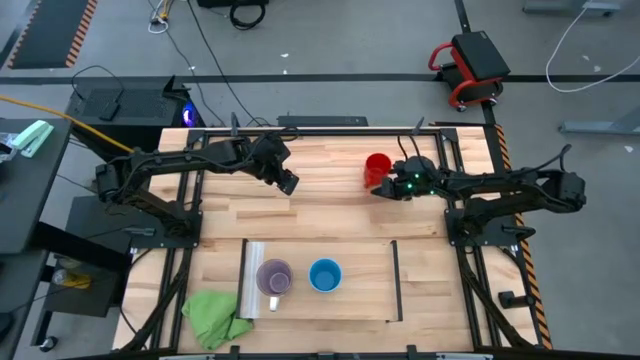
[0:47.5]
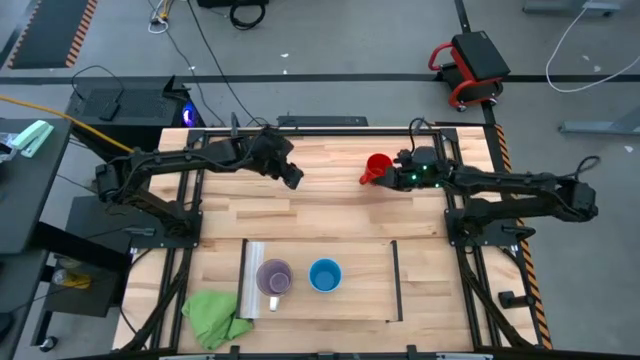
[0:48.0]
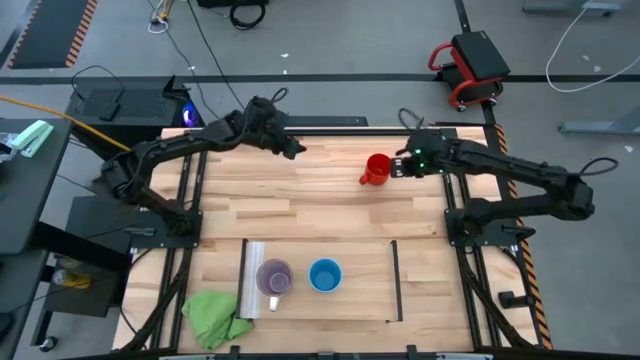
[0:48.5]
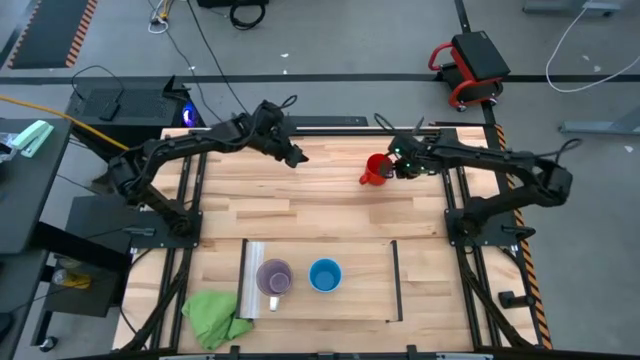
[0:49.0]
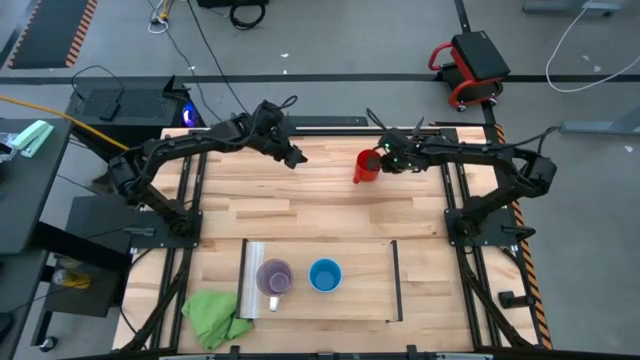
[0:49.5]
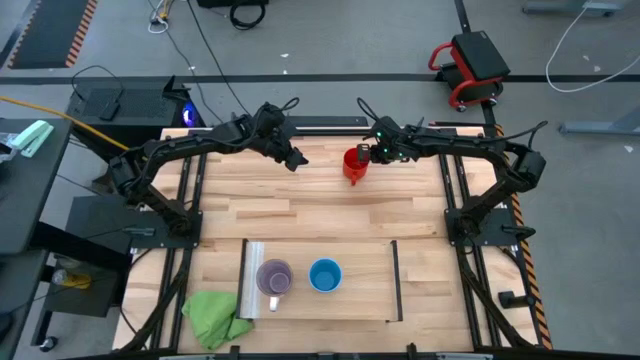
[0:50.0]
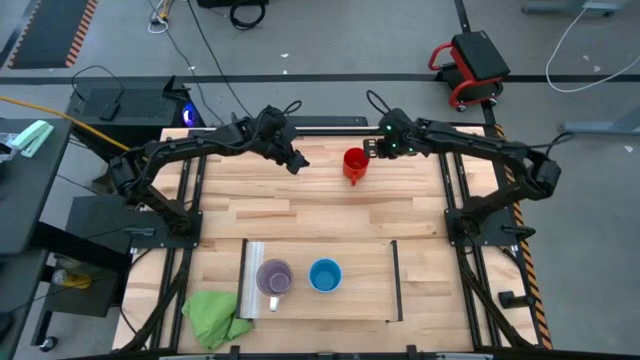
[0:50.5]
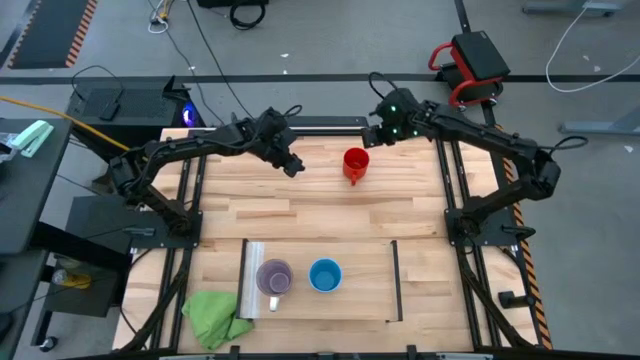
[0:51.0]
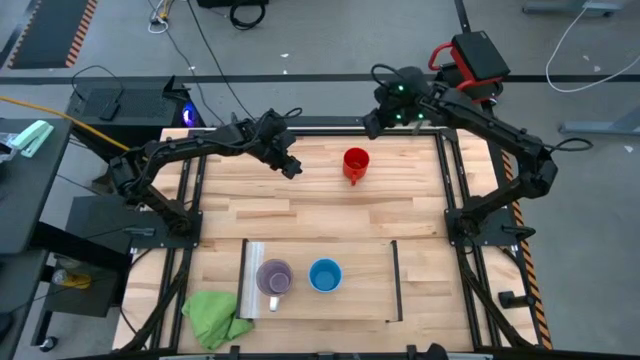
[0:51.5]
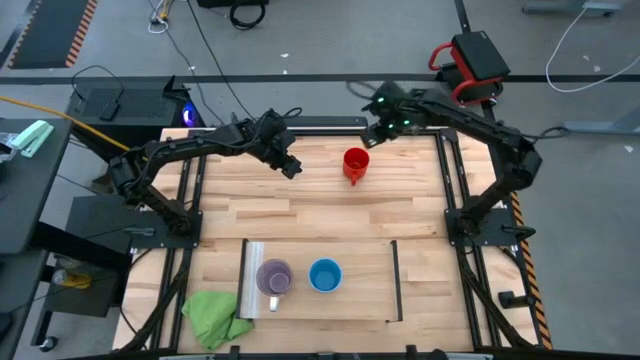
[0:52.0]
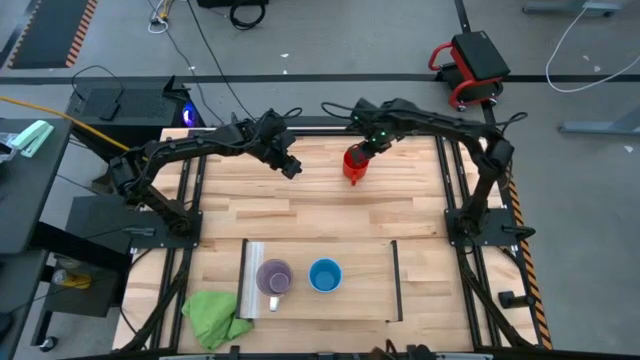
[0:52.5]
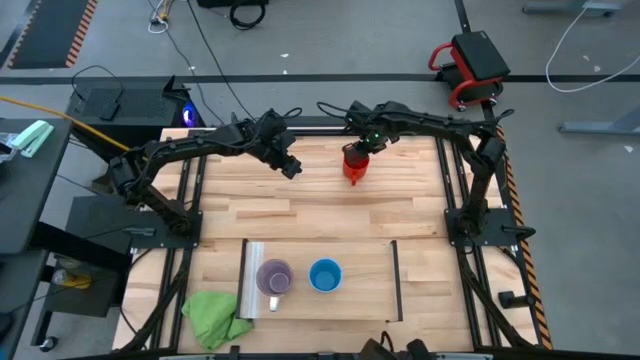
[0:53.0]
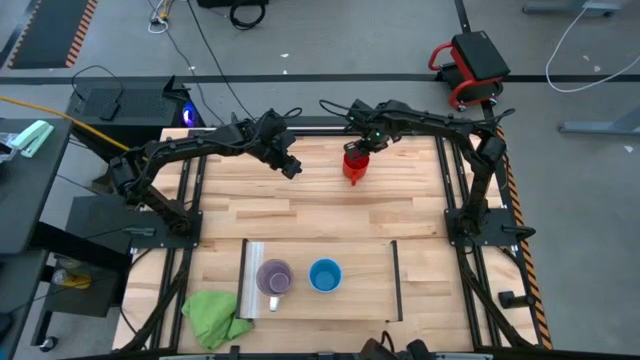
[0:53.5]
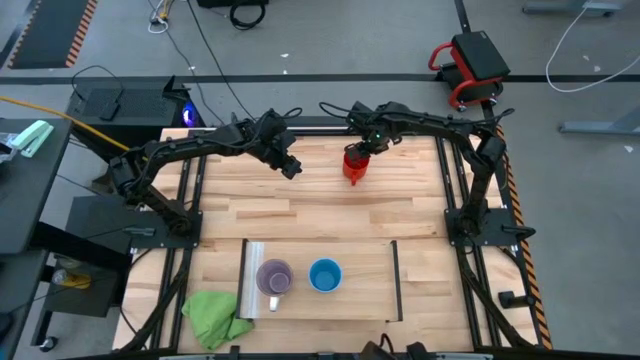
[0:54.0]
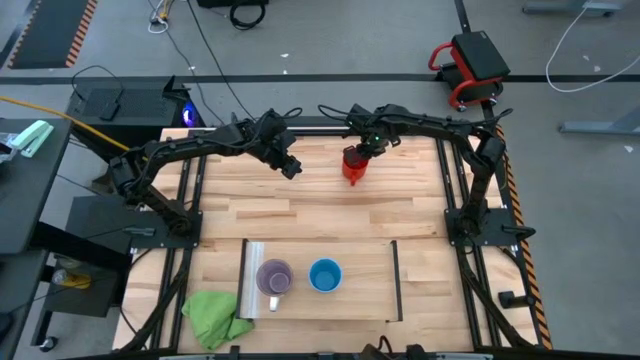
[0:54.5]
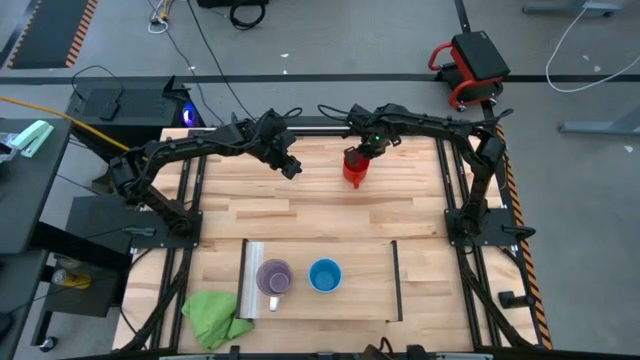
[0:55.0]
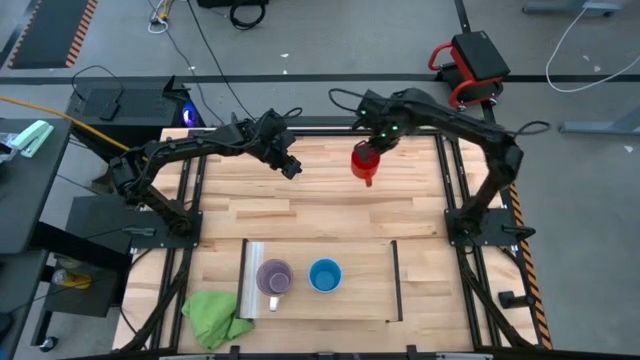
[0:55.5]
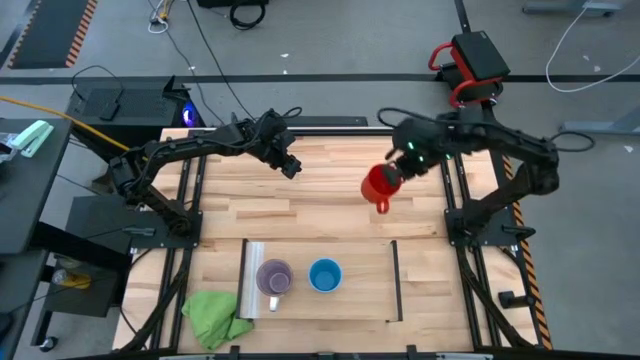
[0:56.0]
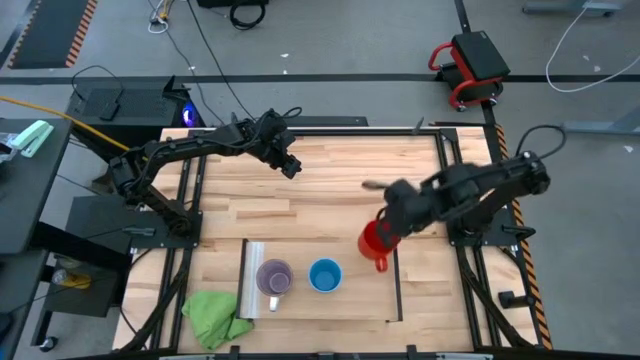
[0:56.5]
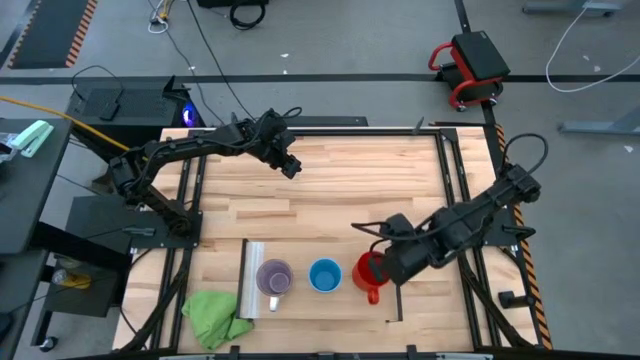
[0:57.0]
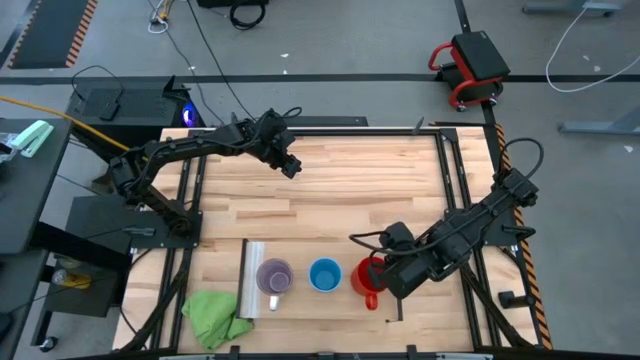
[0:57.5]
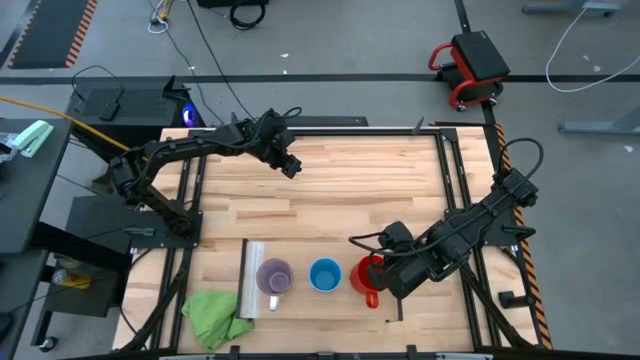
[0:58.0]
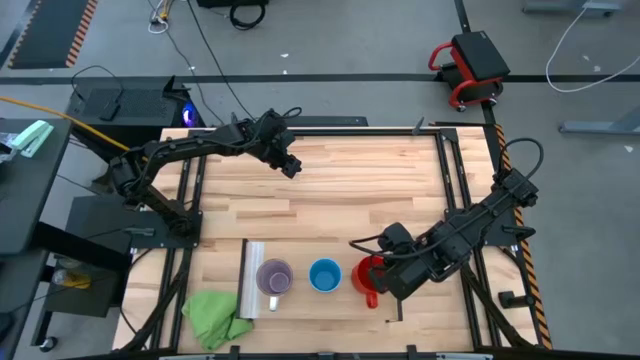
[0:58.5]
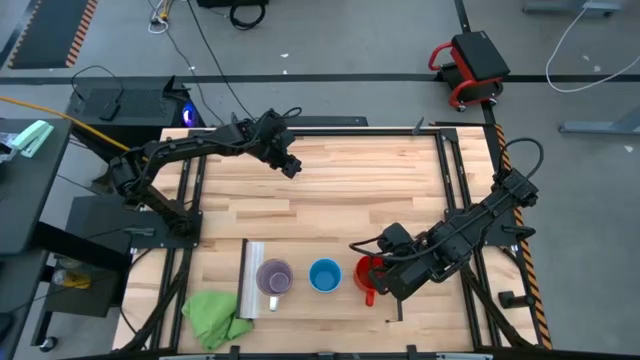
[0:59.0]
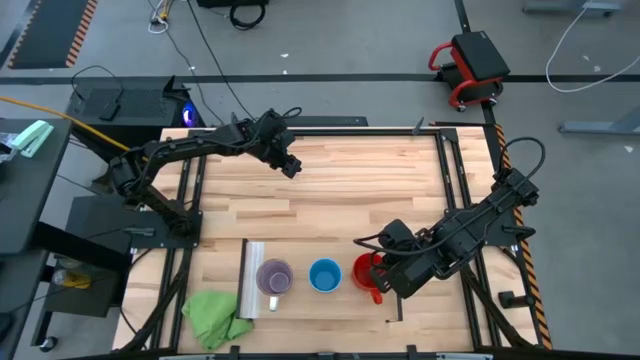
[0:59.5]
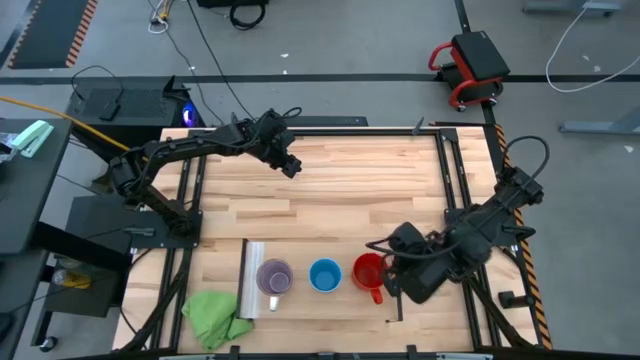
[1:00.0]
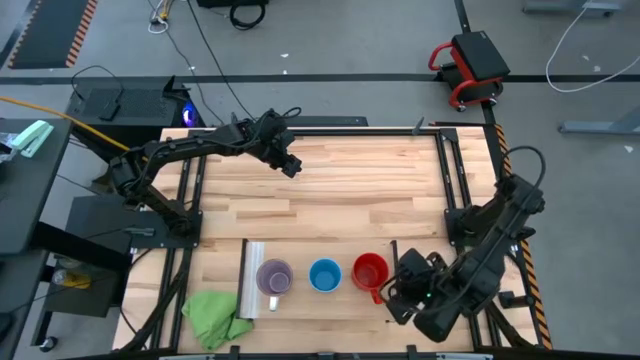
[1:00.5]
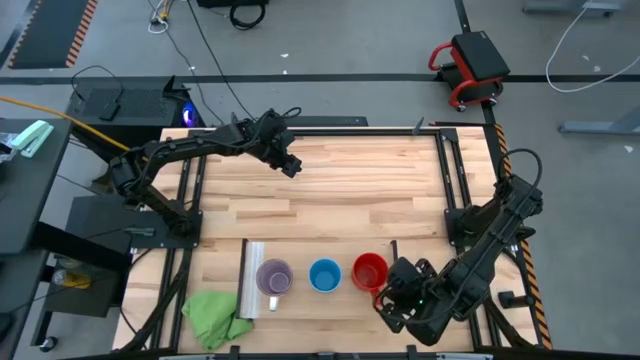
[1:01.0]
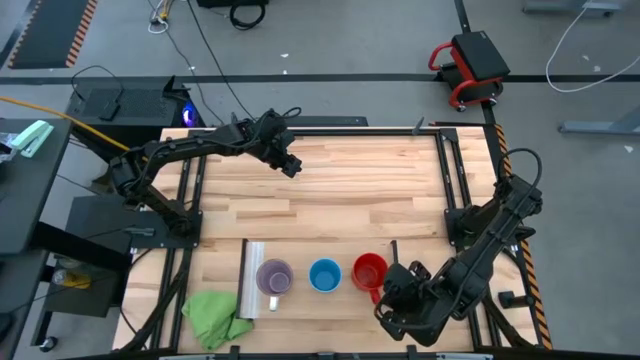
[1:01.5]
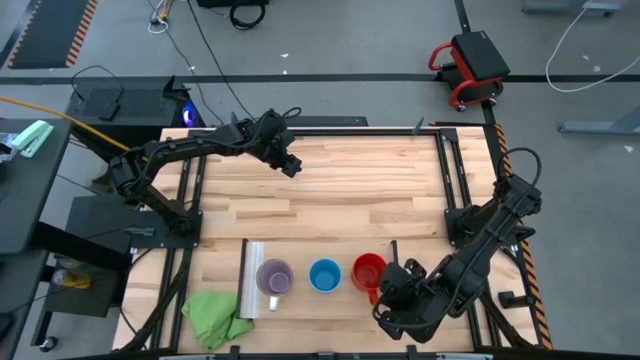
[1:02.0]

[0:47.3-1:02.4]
Task: Stack small to large cups/mugs on shelf
Put the red mug on the shelf

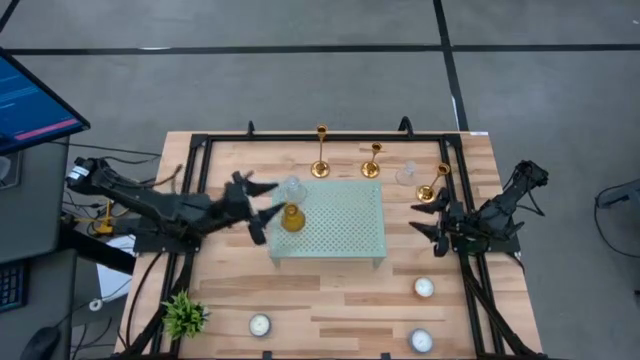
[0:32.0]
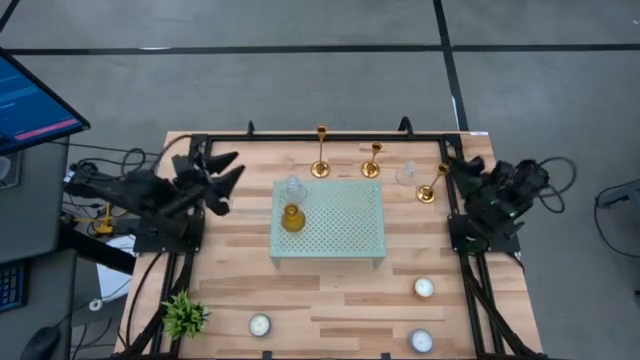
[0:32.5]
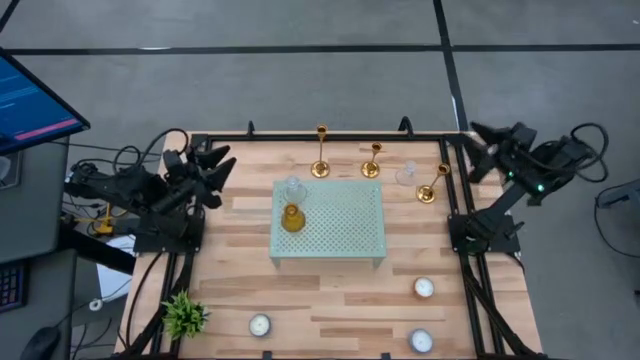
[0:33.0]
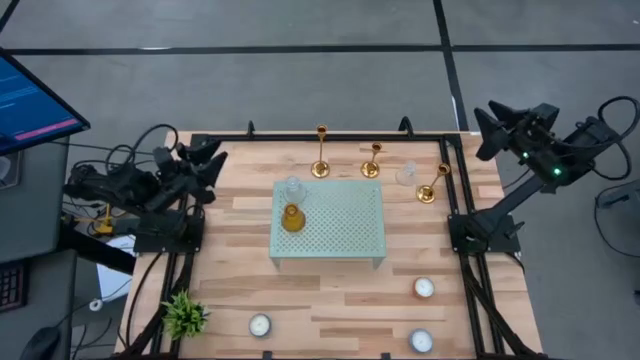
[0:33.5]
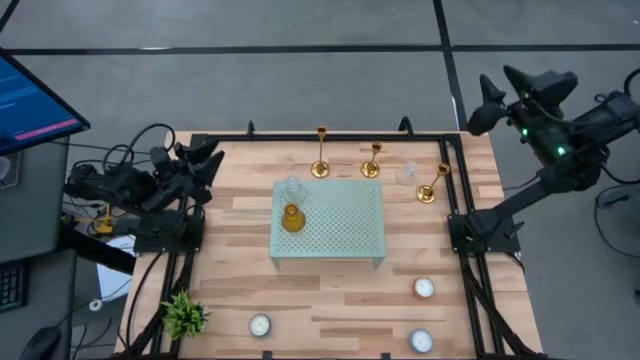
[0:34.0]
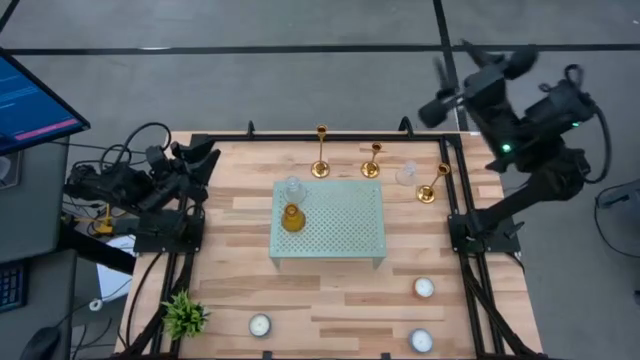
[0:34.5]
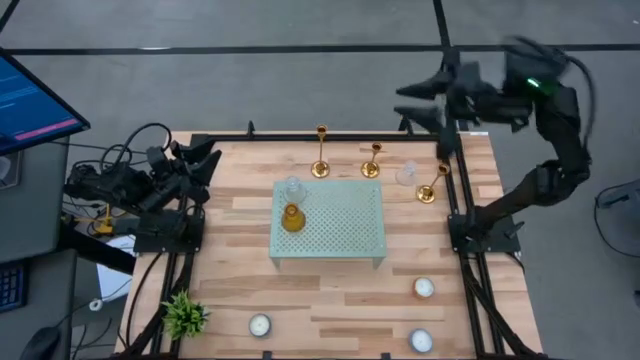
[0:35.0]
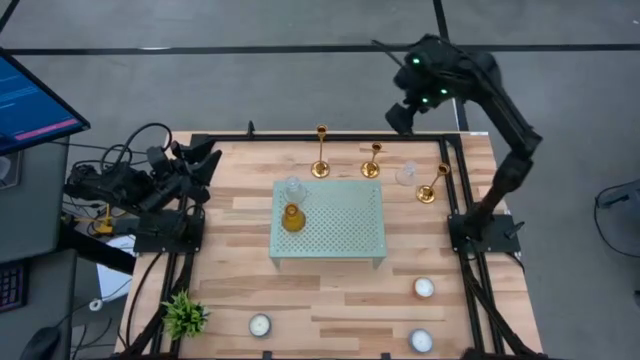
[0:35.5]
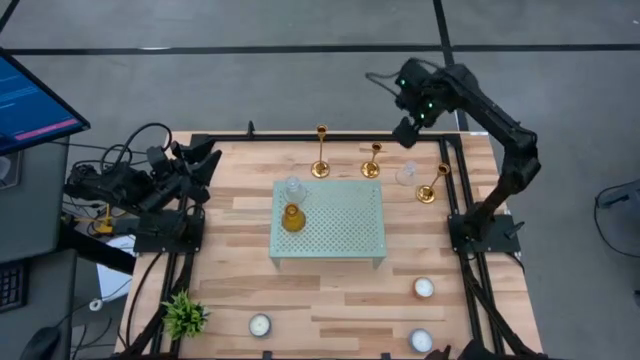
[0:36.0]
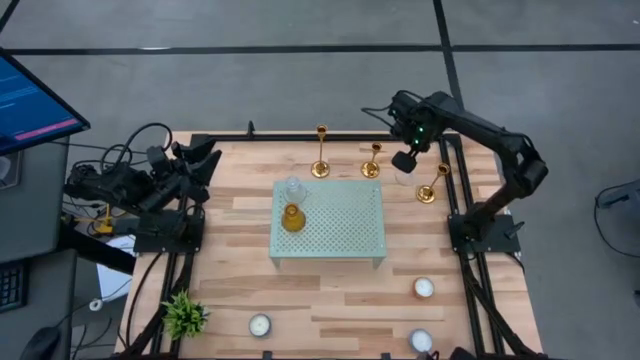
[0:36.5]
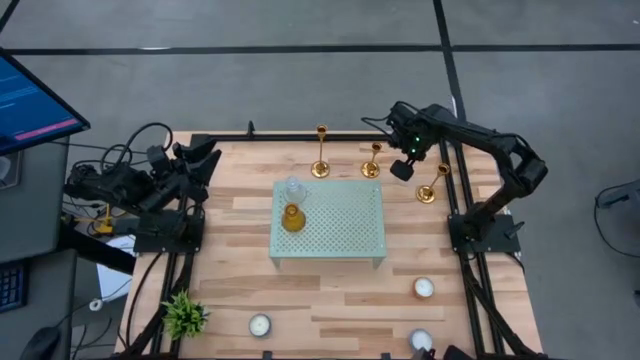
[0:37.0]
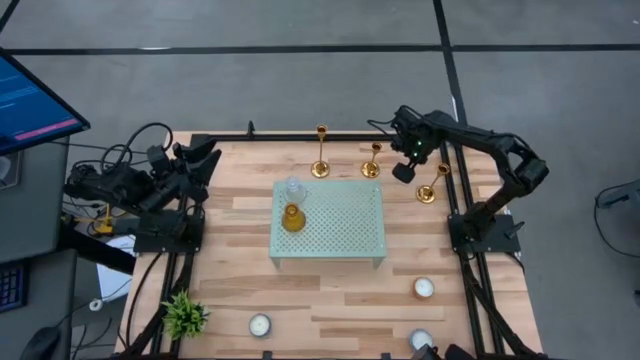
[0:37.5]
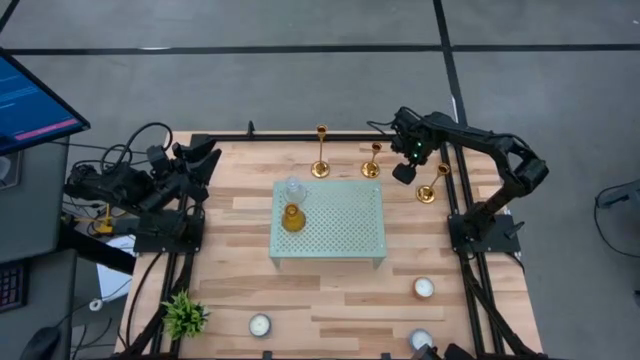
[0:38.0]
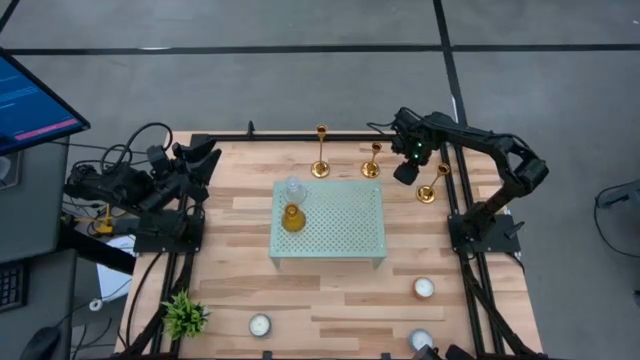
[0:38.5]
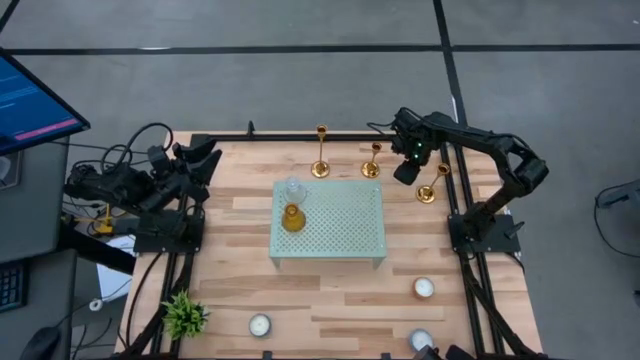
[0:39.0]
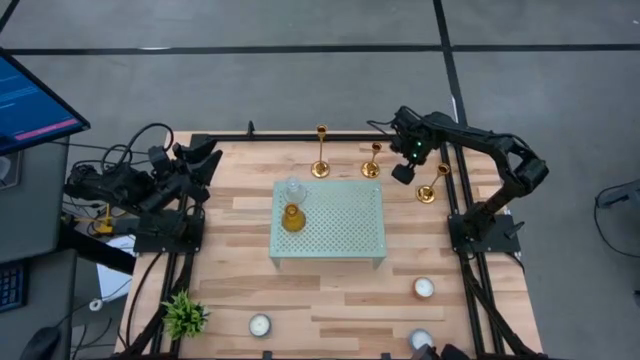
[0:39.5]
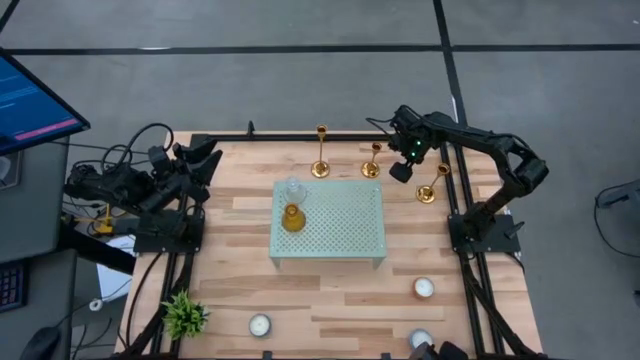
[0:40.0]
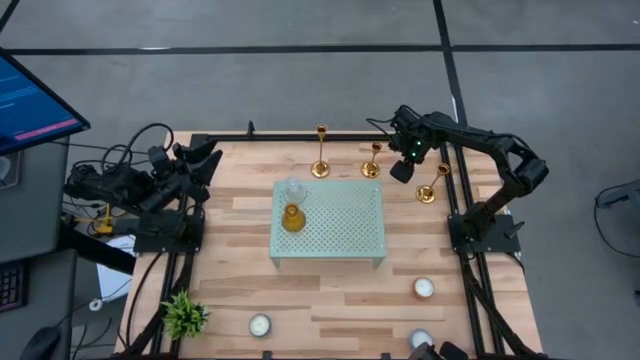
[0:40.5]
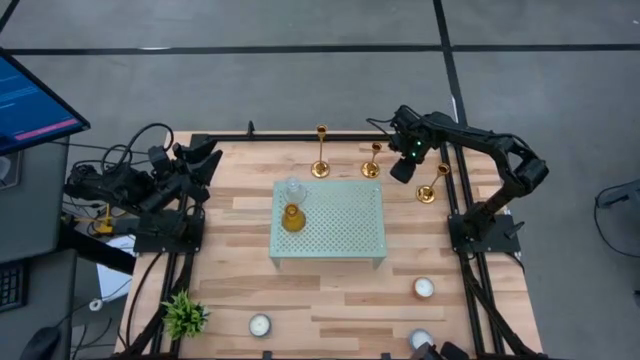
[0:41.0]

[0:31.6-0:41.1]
Task: Pick & Place candle stick holders
Put the transparent glass candle holder on the shelf
